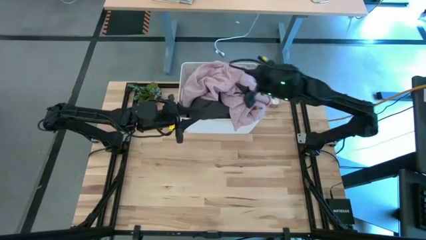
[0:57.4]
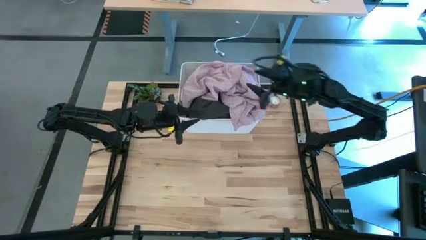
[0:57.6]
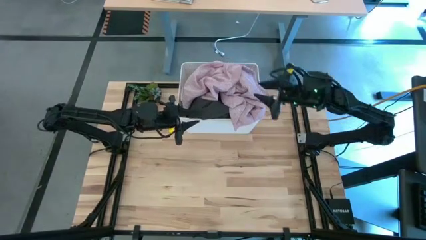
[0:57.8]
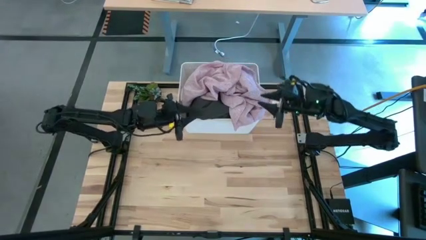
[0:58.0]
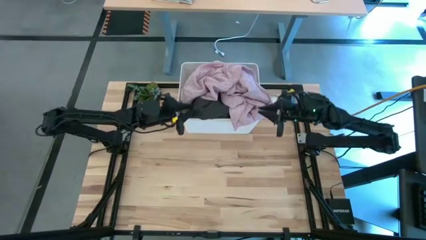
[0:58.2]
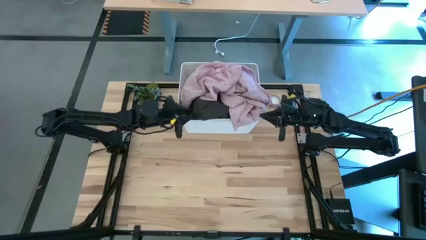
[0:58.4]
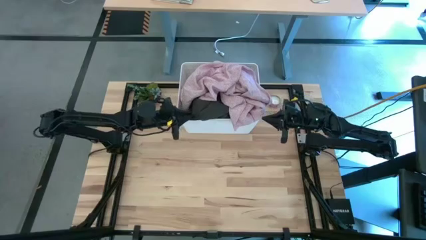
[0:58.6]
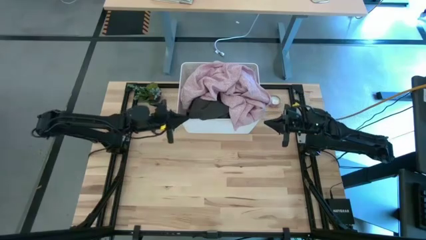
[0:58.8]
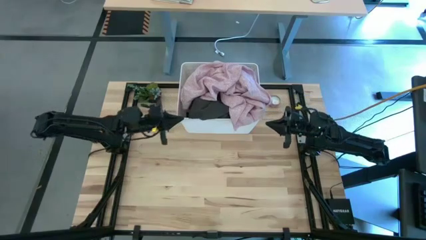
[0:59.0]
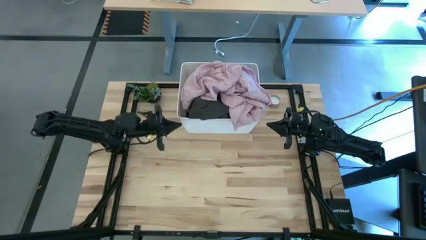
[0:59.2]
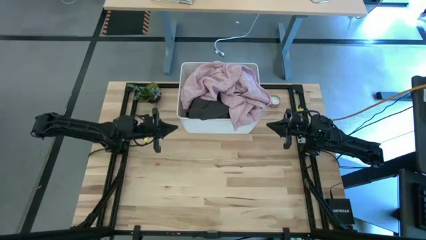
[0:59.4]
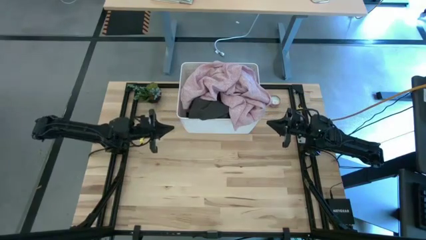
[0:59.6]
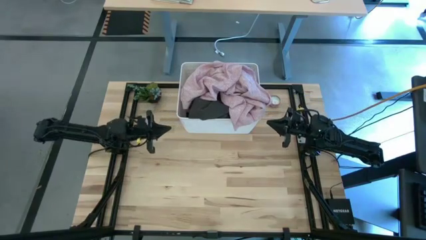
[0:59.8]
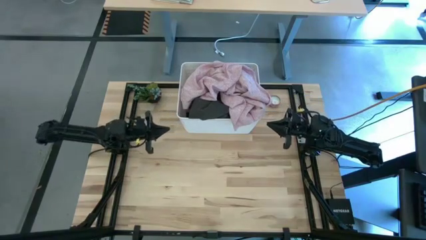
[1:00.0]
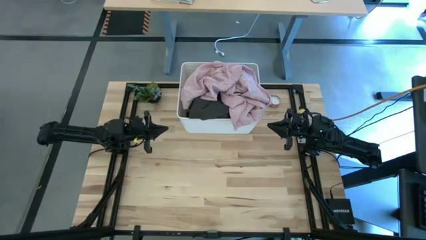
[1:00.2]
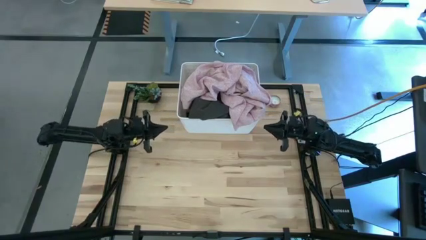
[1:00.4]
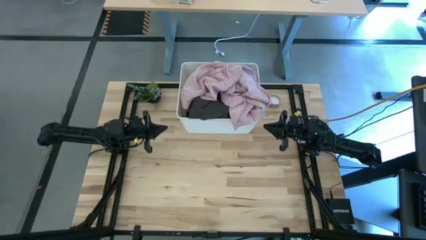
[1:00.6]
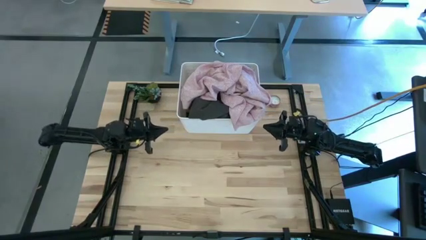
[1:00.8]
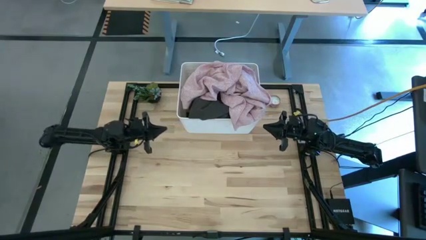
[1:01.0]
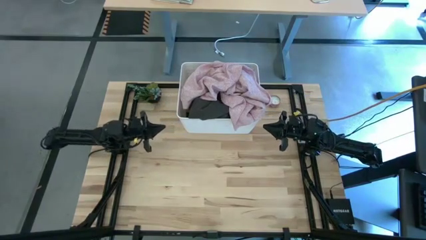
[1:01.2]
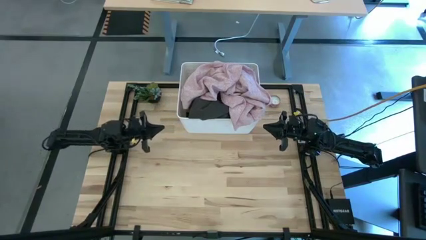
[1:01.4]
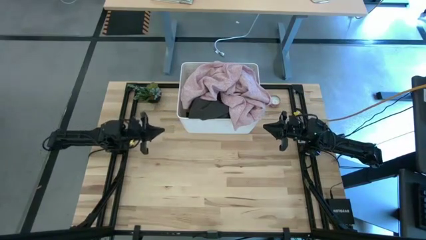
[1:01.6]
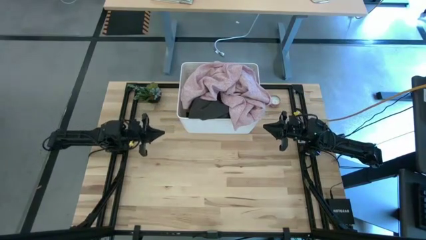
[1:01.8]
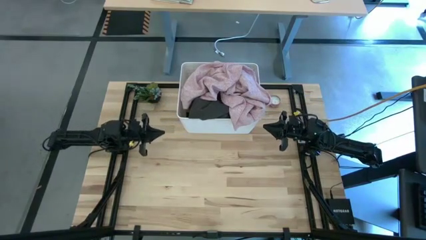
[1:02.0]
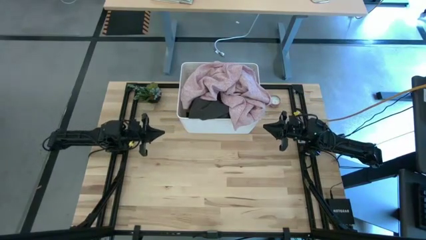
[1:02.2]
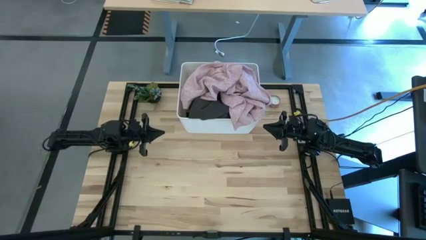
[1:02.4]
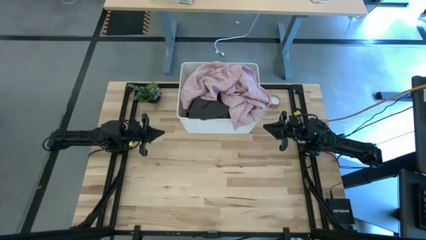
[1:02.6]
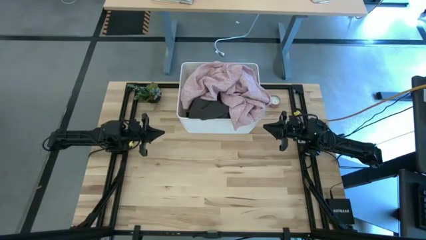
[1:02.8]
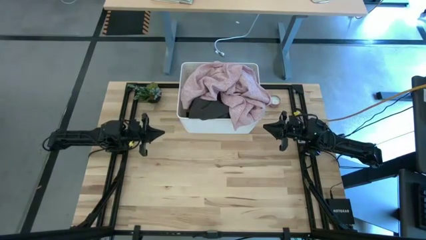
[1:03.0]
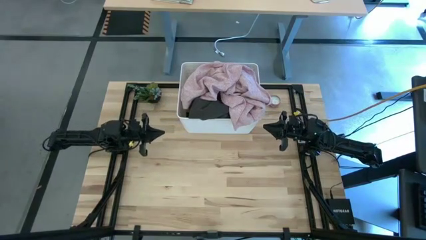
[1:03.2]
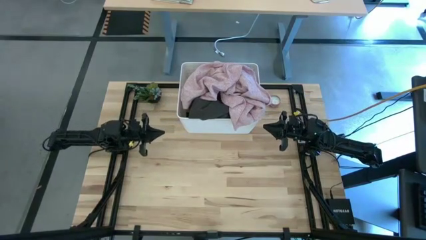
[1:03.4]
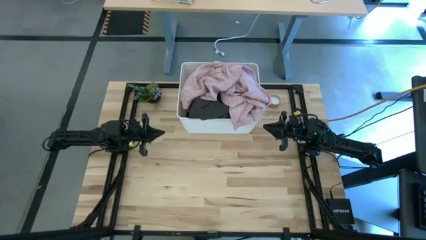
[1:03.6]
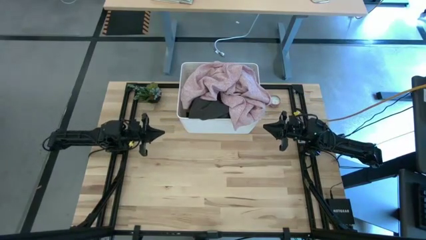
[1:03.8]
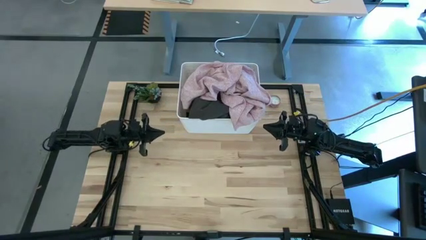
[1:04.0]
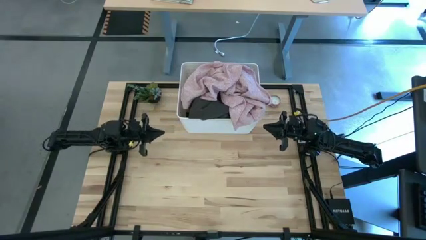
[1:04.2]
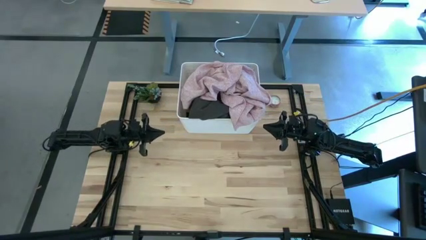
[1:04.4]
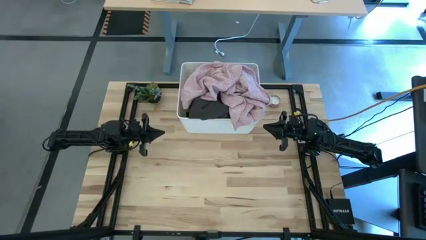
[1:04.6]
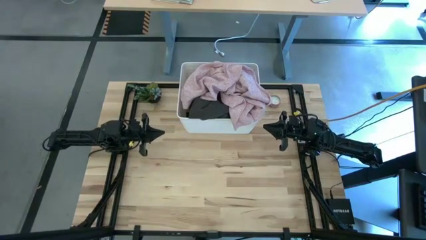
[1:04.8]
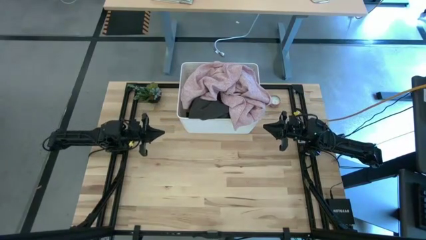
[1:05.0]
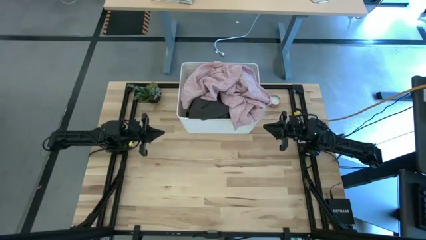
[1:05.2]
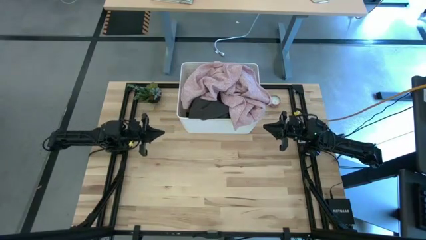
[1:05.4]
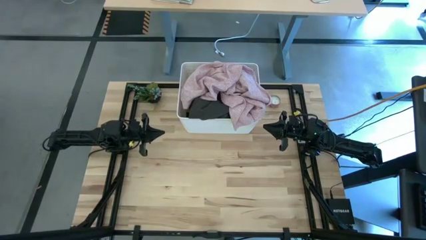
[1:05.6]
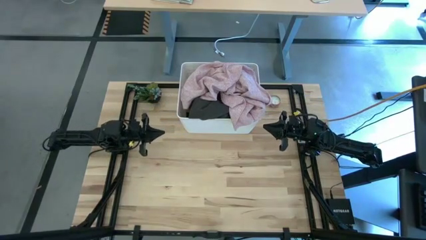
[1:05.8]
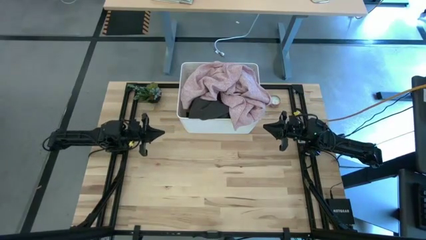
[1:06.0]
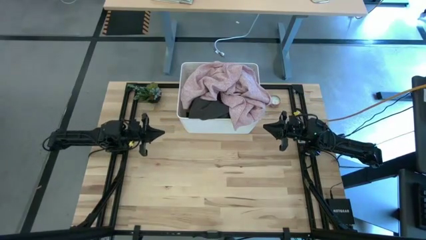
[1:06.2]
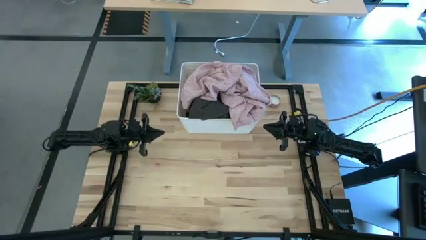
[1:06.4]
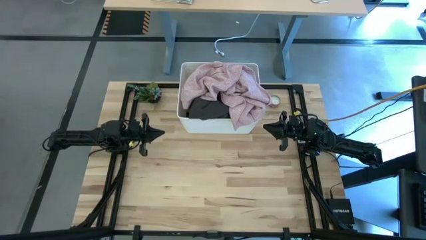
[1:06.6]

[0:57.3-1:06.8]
Task: Sort clothes
Return to Home Position

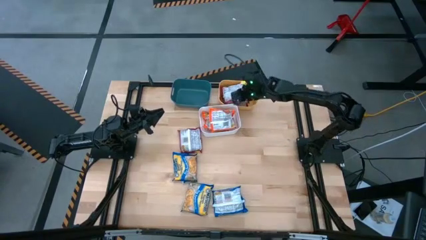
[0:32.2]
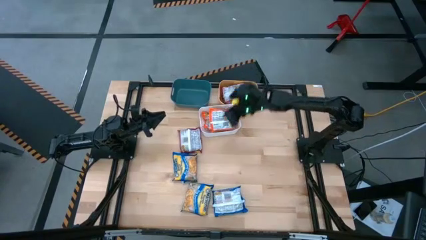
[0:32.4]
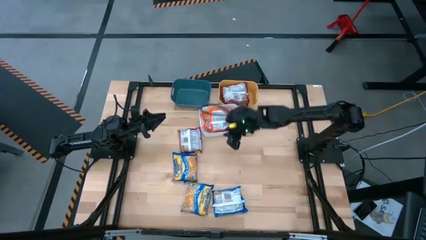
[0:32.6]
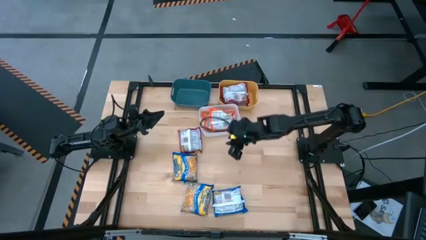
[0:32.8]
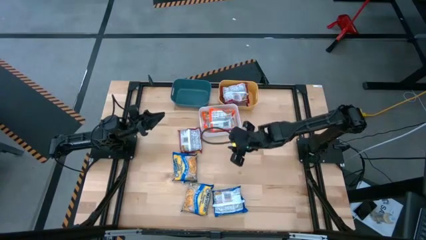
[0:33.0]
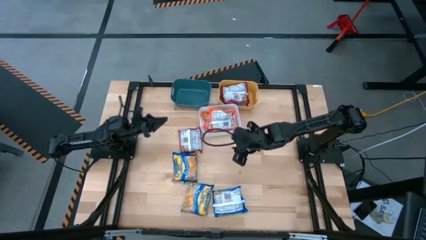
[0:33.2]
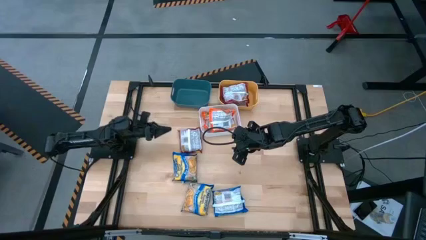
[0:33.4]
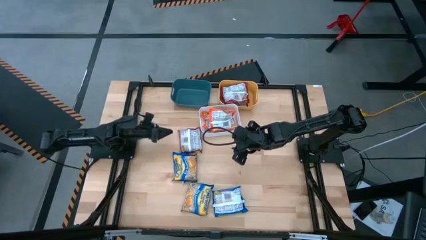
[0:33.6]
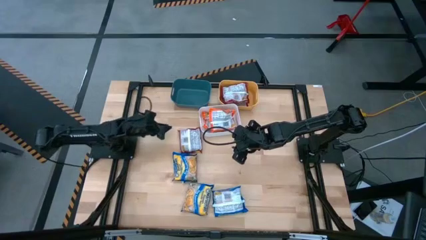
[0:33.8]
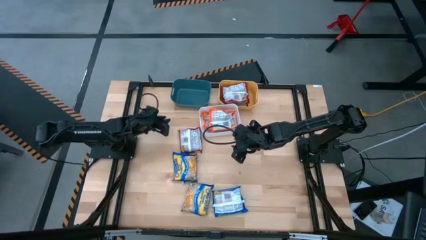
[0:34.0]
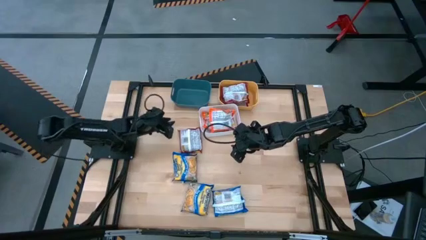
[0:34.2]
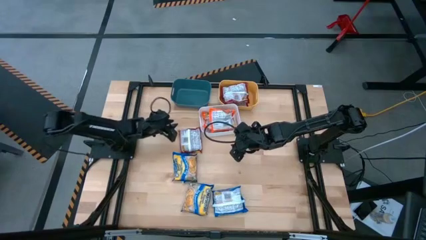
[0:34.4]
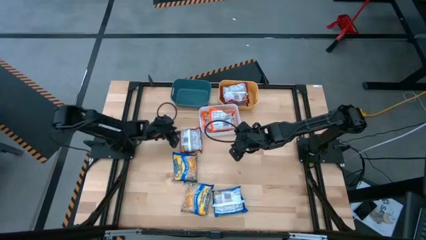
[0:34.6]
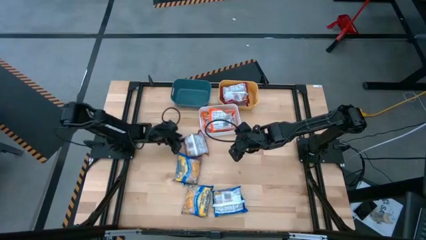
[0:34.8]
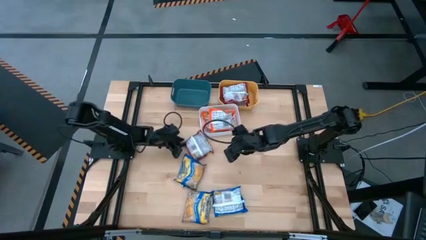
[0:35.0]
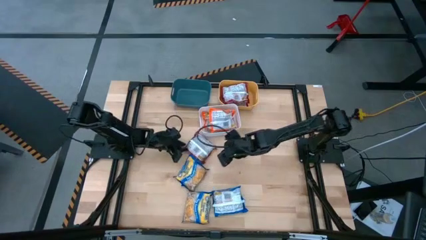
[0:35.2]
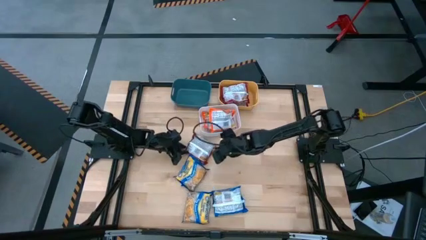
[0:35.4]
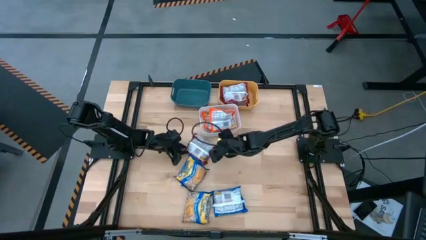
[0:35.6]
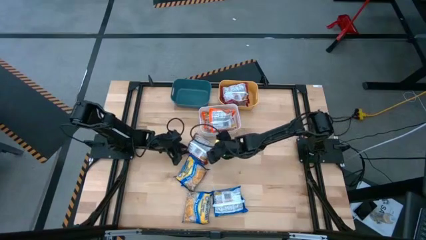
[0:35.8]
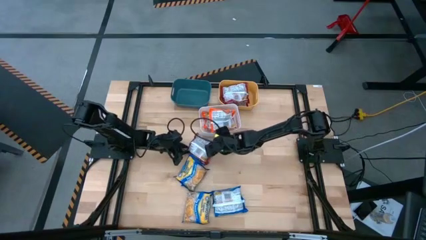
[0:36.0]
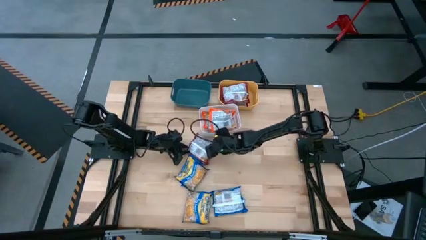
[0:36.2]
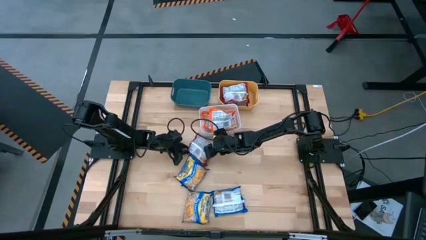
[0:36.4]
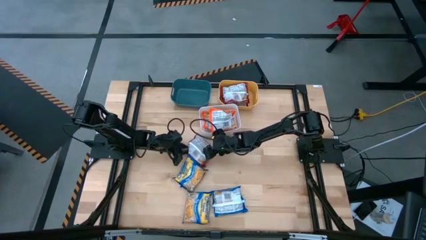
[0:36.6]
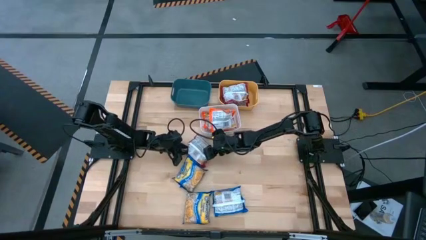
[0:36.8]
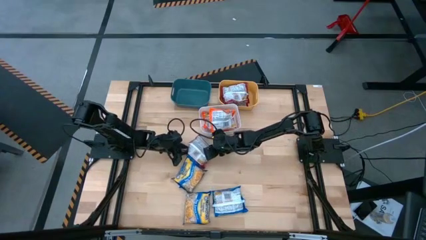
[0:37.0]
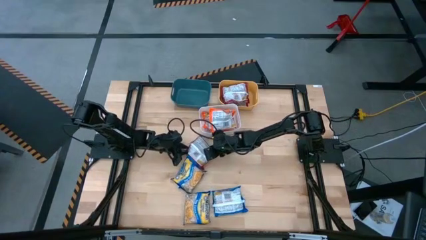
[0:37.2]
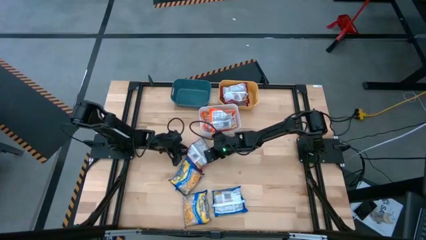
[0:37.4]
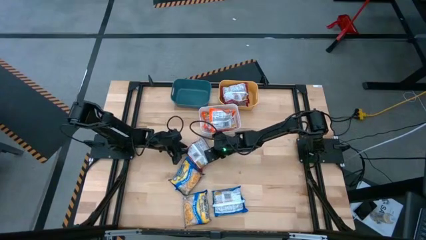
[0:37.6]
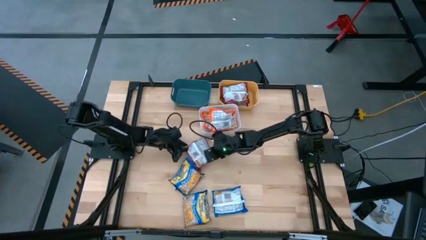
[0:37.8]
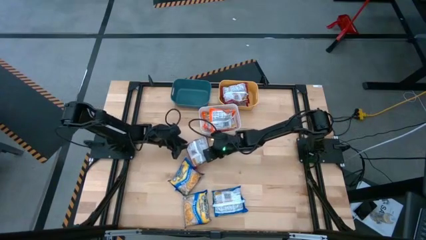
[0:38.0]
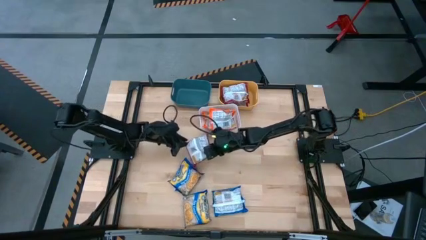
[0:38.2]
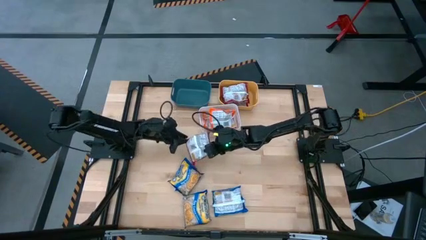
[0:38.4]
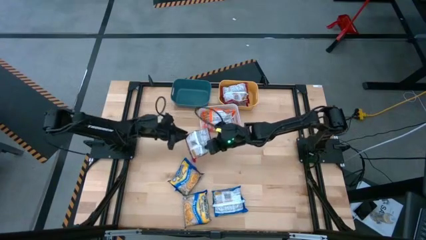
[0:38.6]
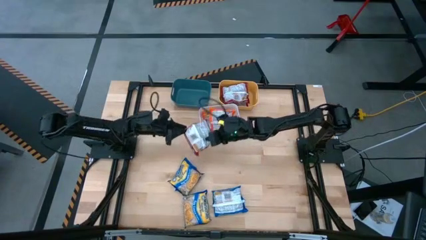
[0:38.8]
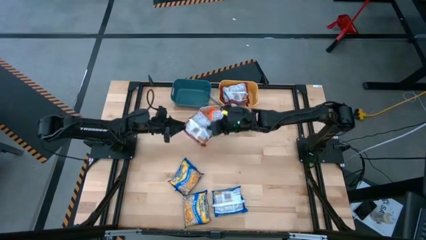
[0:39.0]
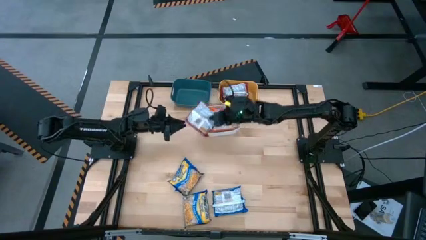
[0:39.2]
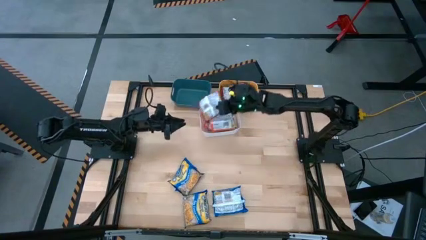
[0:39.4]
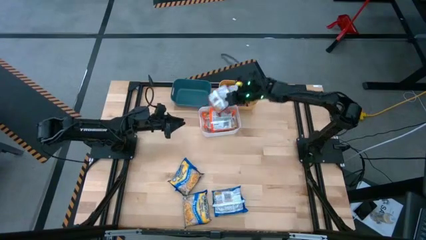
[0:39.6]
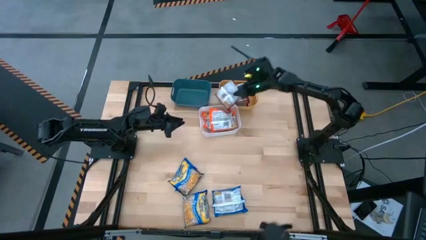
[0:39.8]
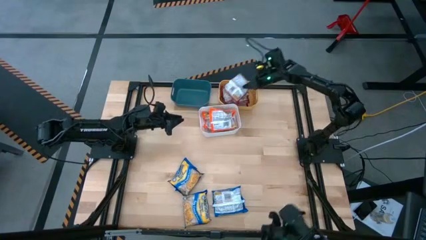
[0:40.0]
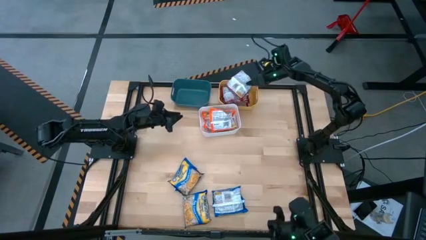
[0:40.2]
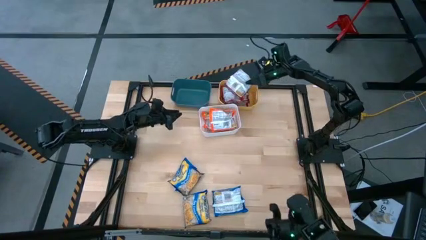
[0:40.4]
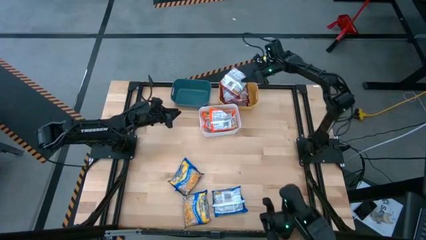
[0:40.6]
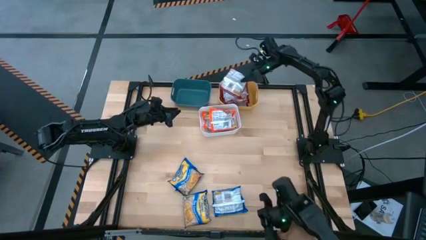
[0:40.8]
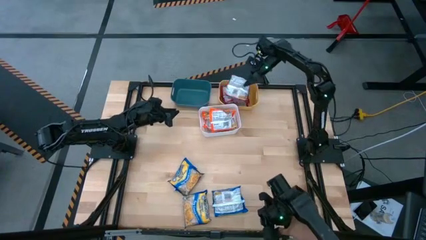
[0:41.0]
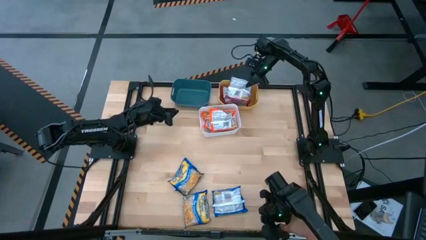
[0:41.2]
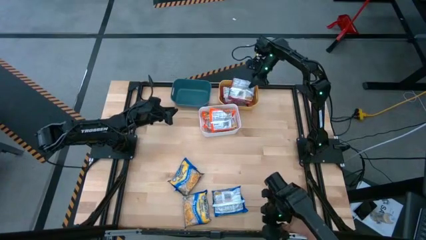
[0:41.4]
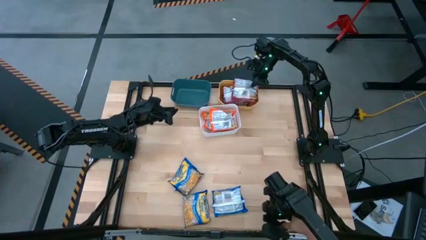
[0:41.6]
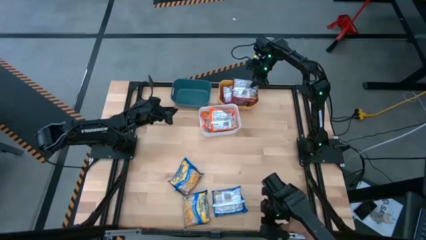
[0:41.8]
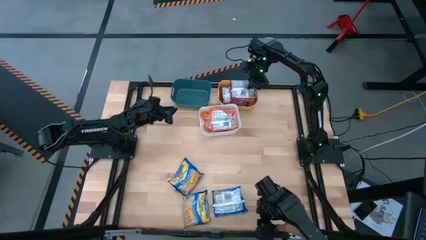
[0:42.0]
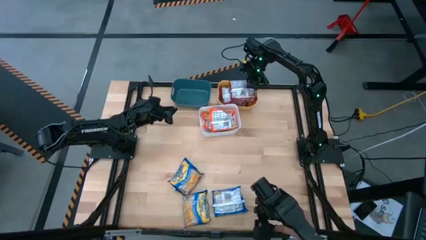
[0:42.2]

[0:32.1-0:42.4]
Task: Sort Maruchan noodles
Put the red noodle pack into the yellow bin
